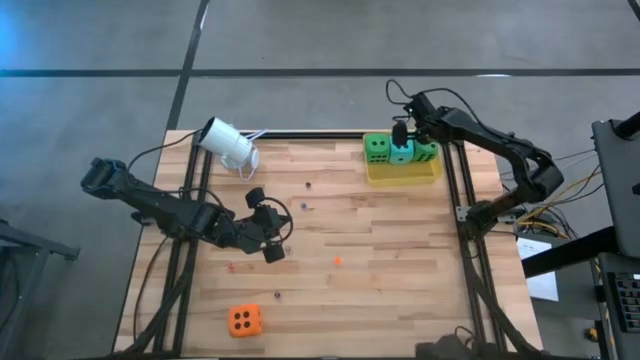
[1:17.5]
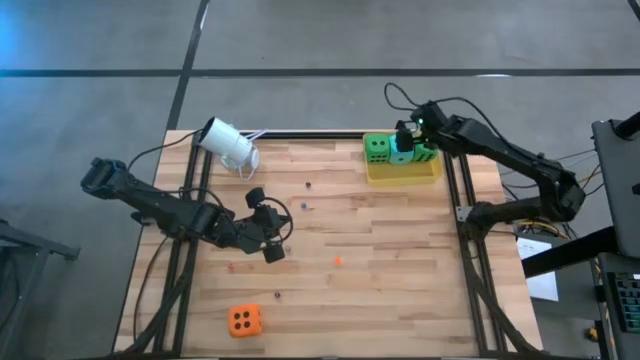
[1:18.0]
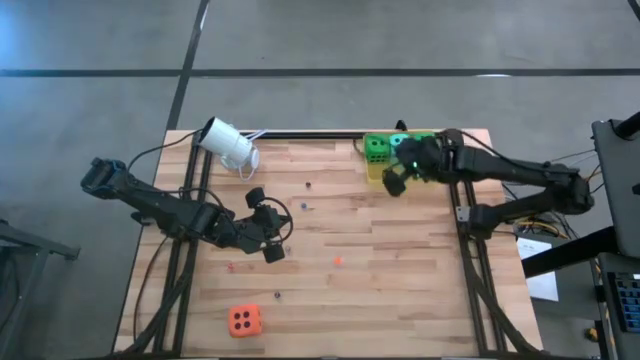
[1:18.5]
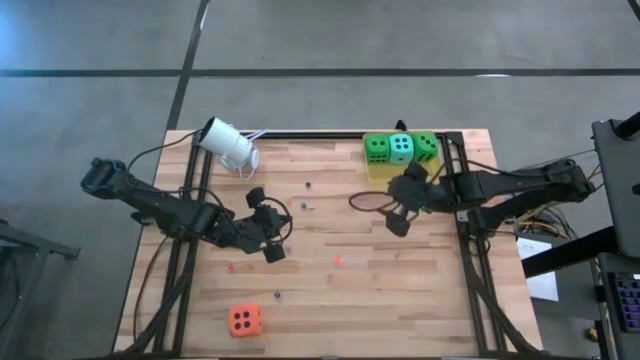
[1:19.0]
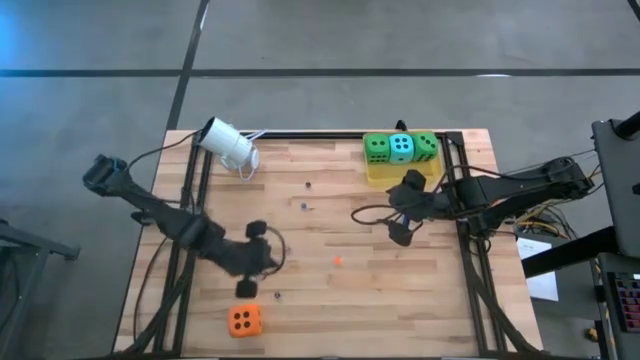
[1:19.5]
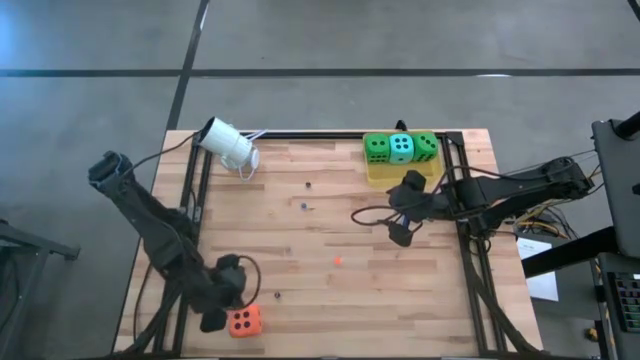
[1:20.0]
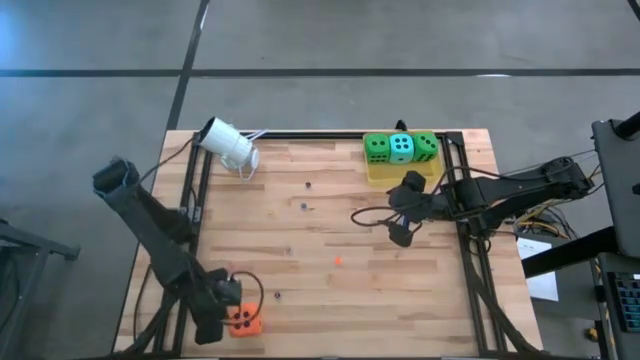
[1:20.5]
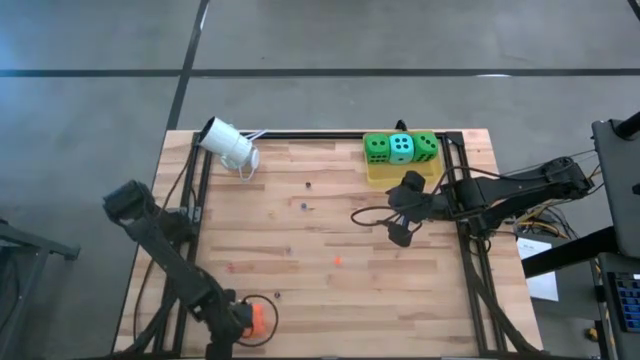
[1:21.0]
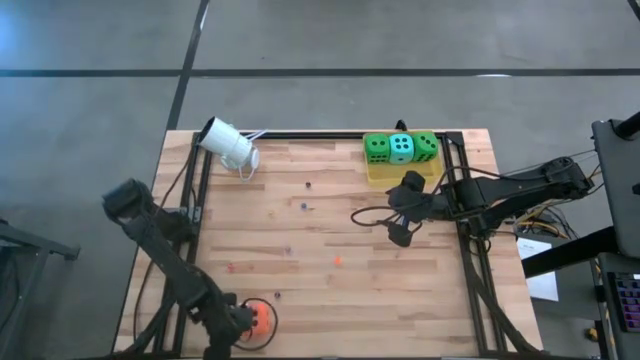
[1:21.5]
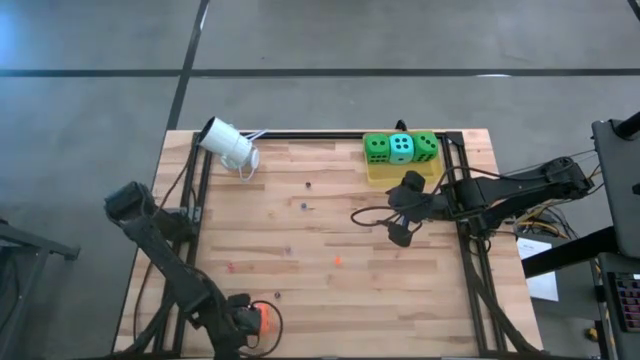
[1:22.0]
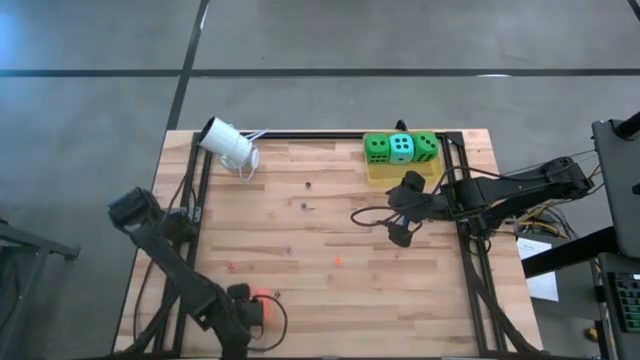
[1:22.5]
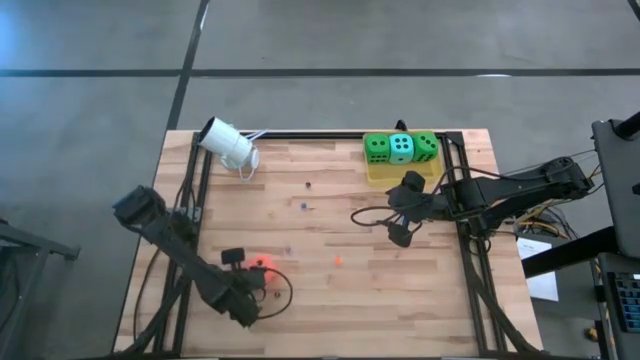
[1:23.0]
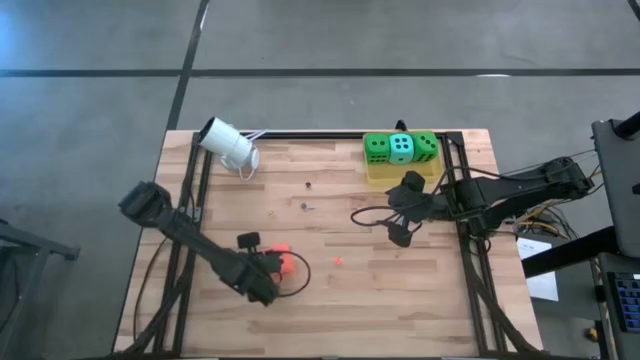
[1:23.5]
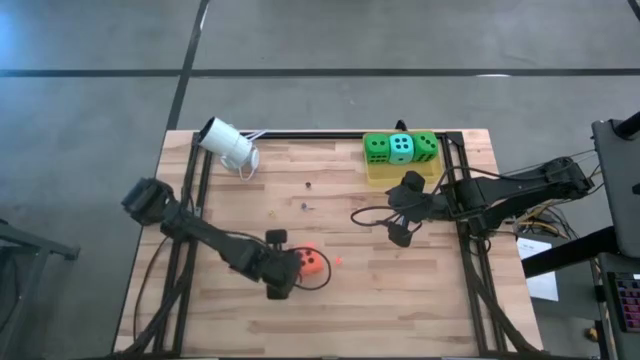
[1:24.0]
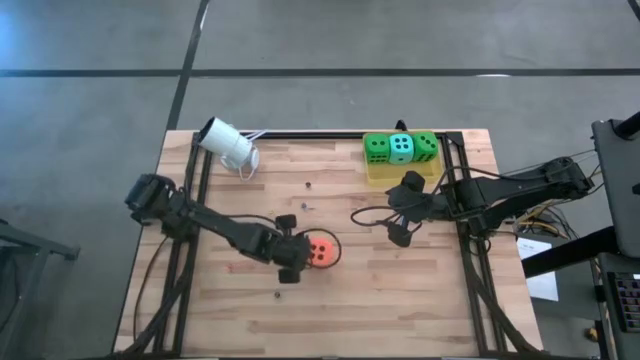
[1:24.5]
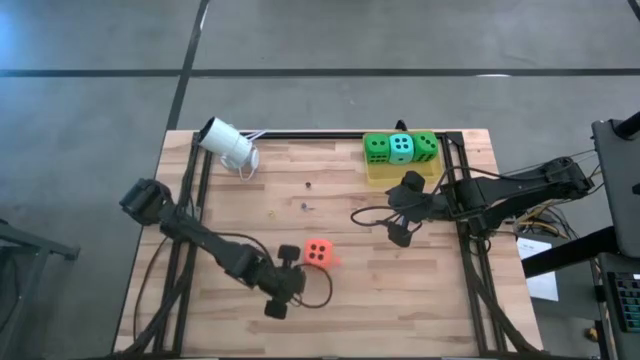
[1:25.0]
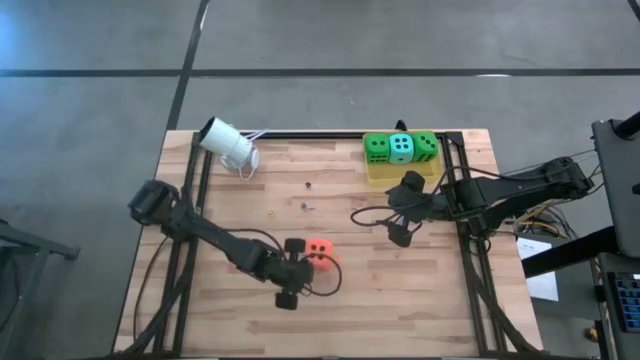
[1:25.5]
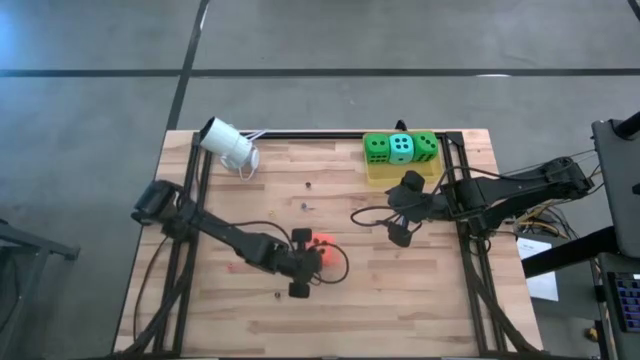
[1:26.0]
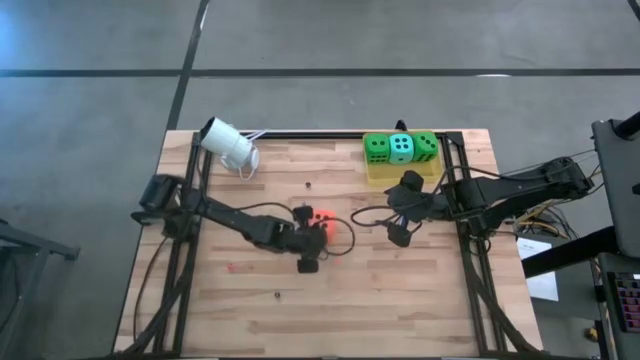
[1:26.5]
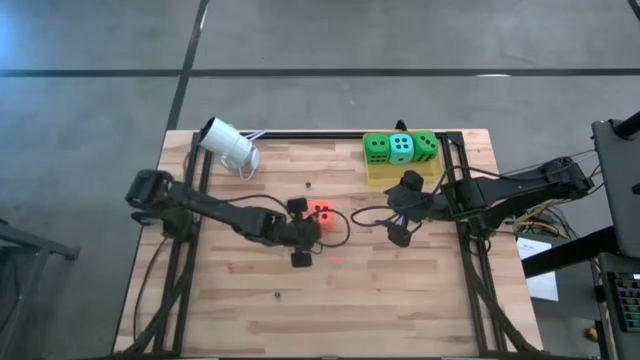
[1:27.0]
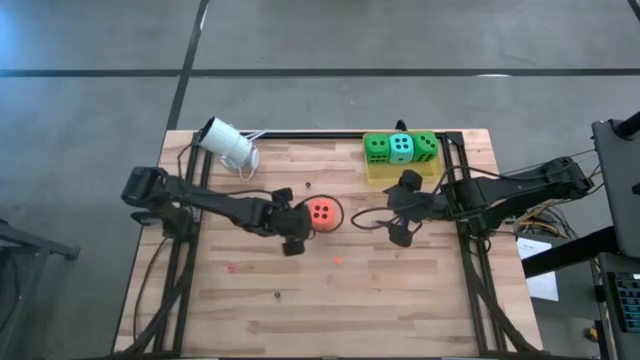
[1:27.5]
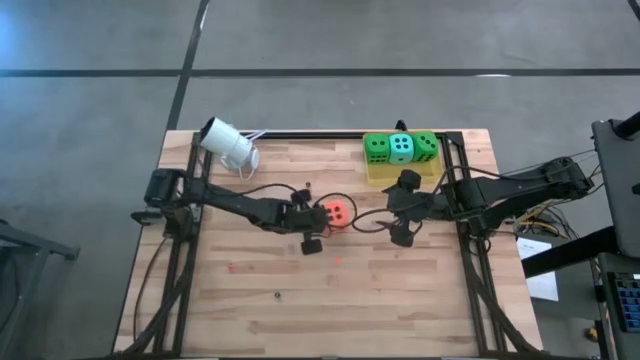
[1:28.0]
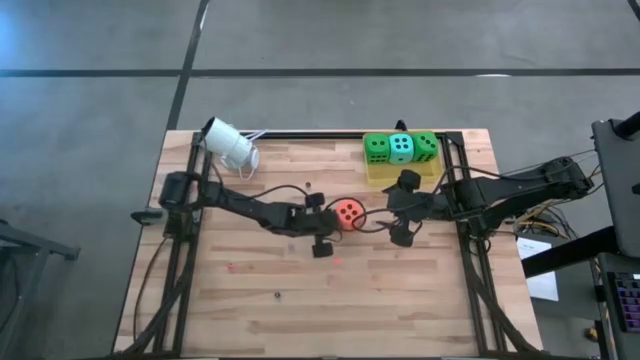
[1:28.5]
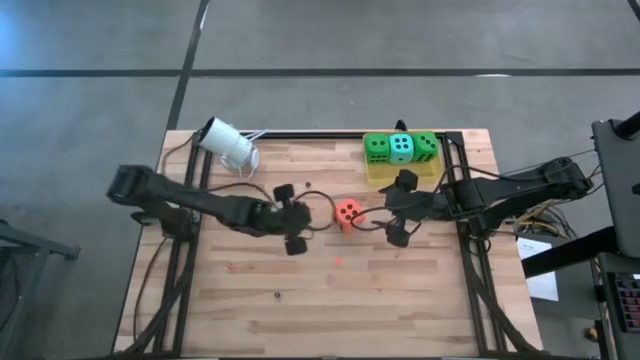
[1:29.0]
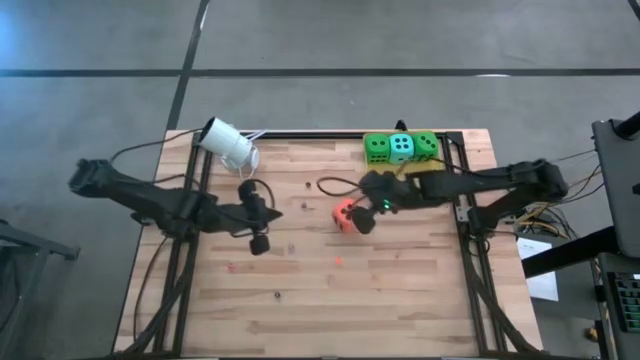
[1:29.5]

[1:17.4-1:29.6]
Task: Pick & Place Dice
Put the large orange dice into the yellow transparent bin

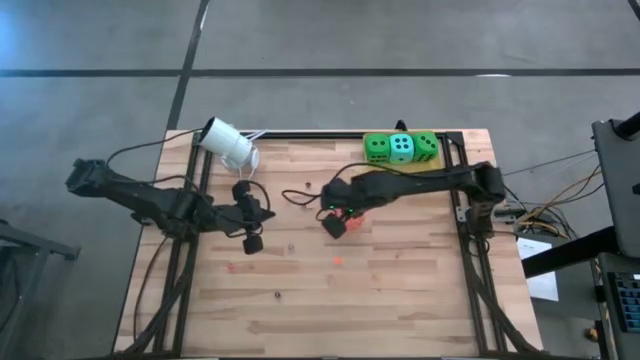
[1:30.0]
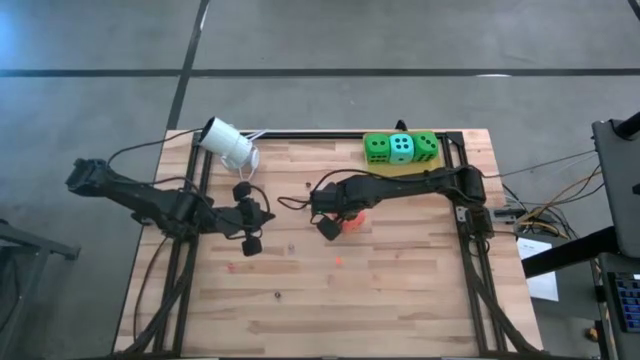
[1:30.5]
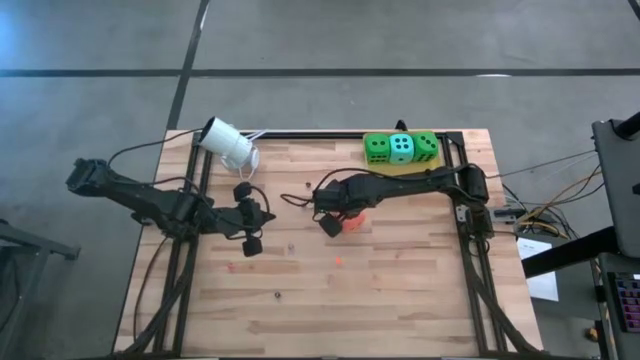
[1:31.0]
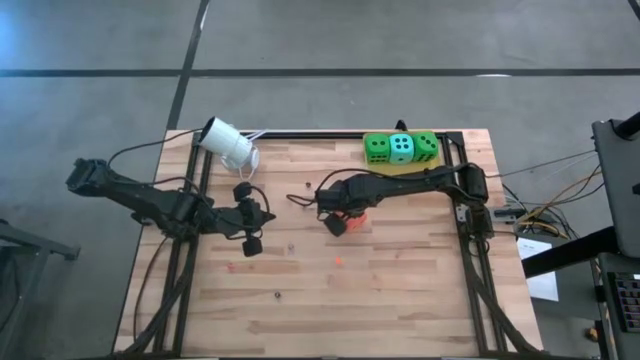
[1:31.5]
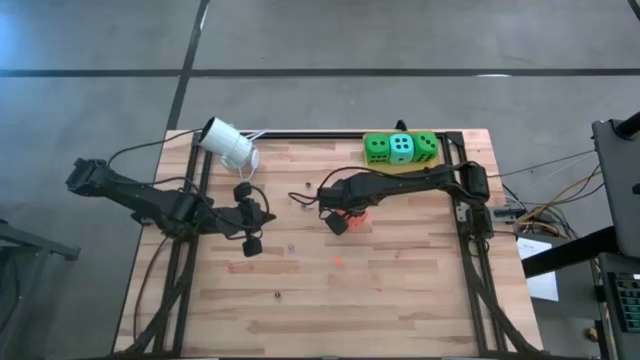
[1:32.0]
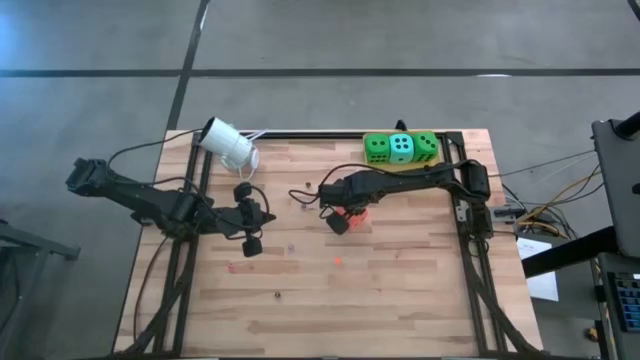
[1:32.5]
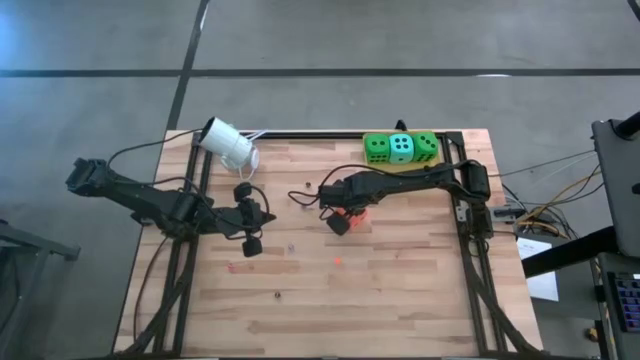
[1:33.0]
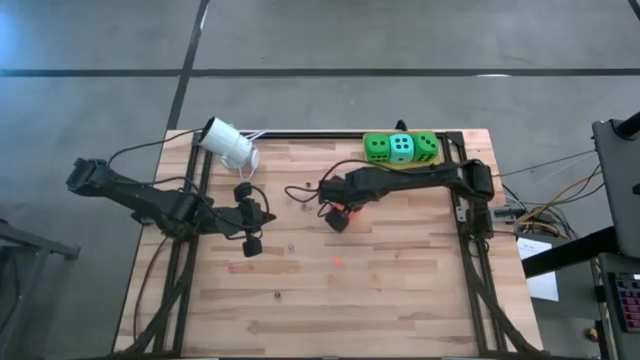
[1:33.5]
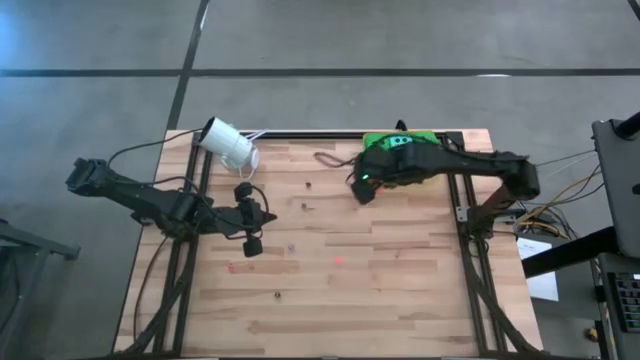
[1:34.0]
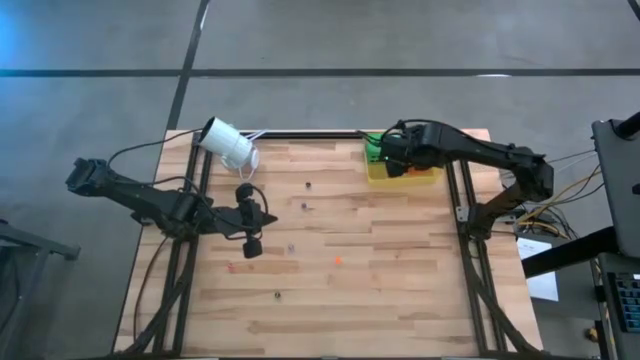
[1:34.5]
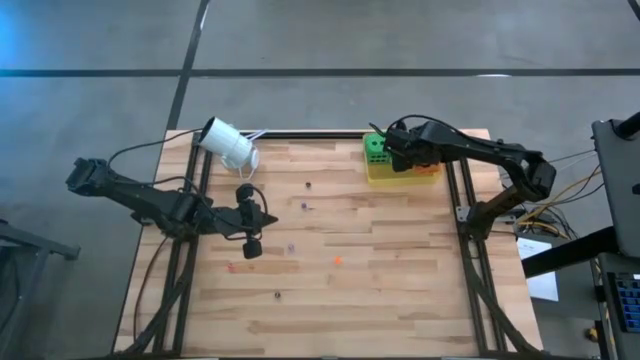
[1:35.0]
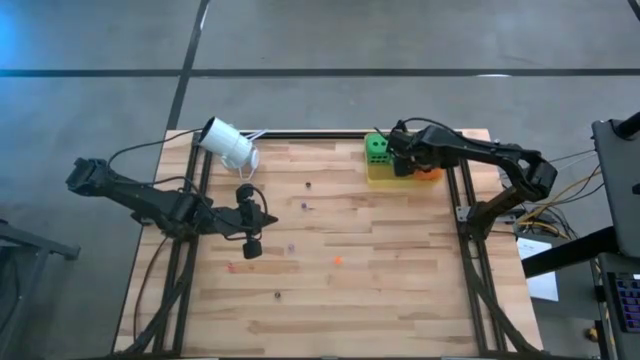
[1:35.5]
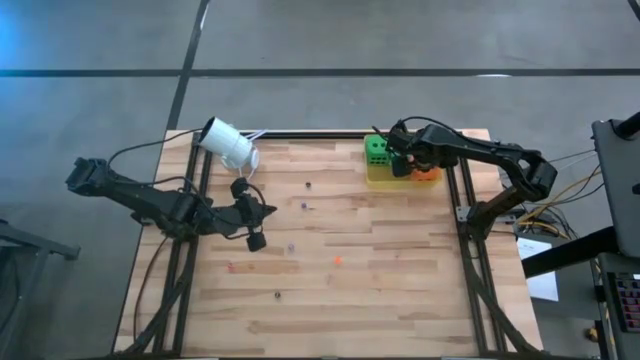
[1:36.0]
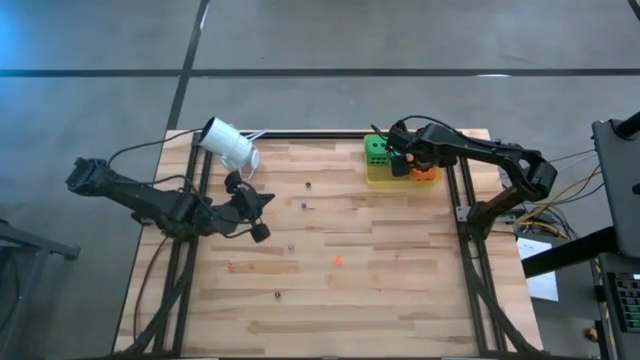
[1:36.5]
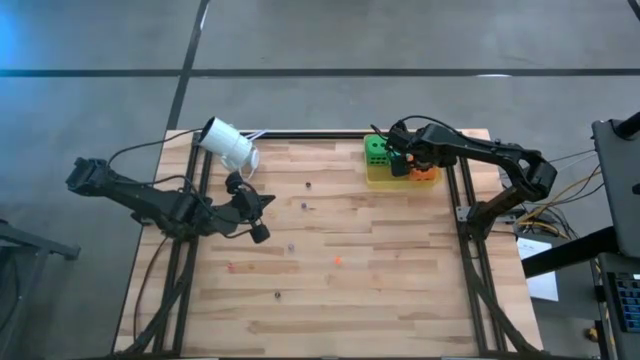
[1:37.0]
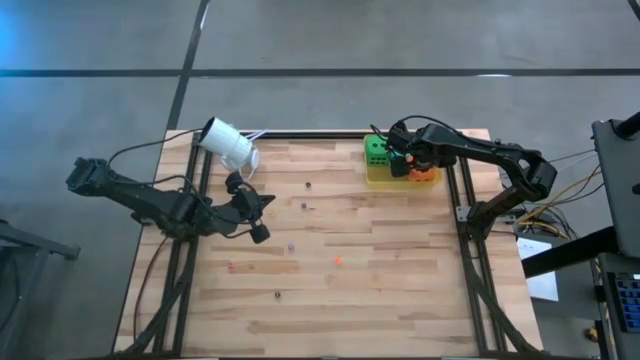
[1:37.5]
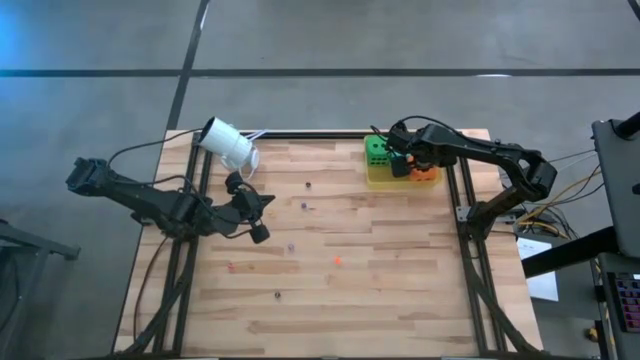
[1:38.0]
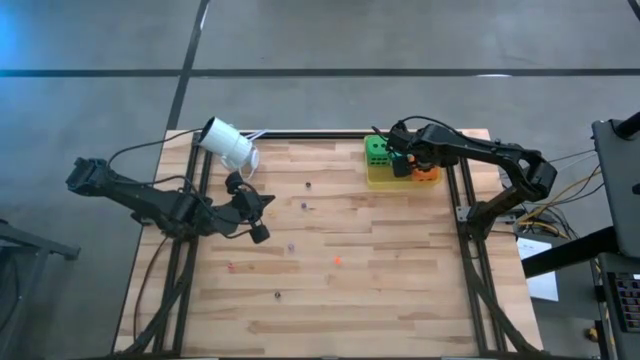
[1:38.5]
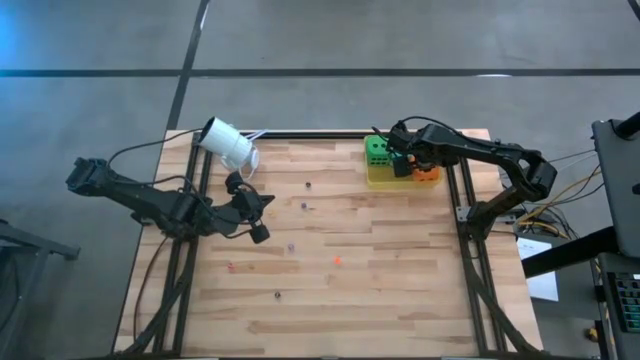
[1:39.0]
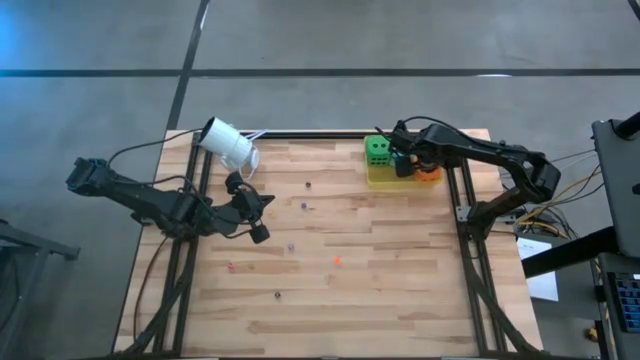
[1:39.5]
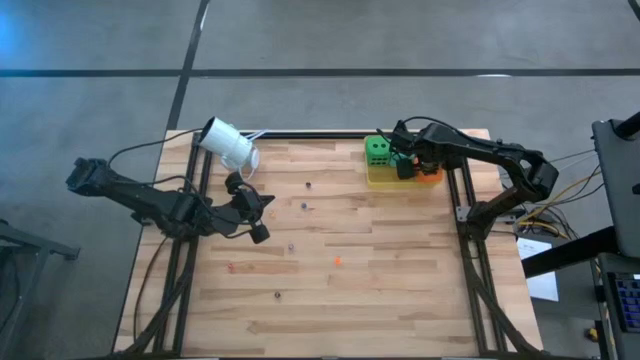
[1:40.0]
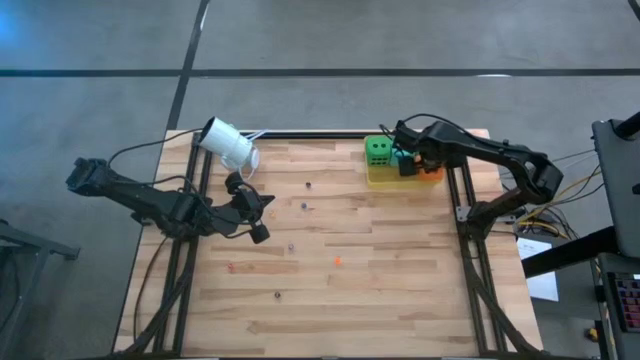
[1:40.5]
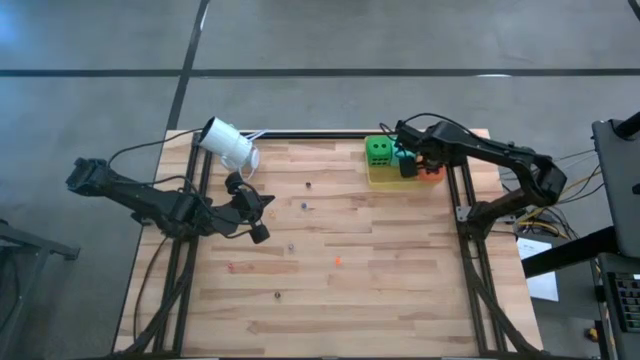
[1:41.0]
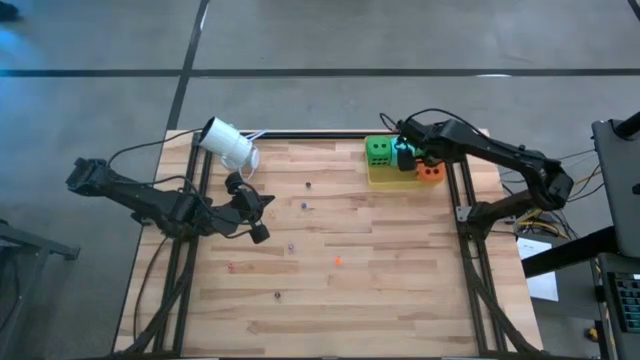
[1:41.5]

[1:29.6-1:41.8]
Put the large orange dice into the yellow transparent bin
